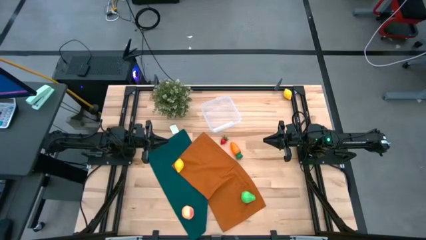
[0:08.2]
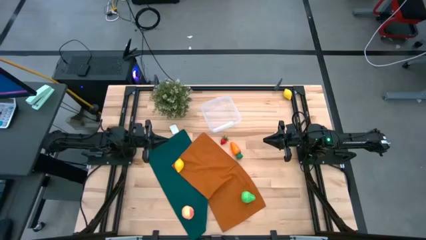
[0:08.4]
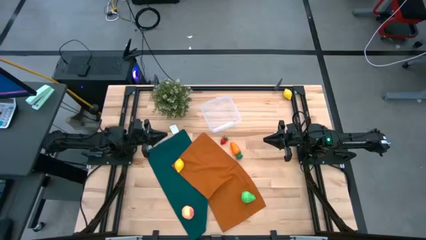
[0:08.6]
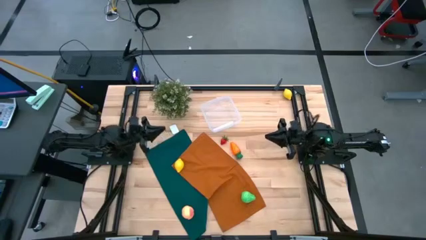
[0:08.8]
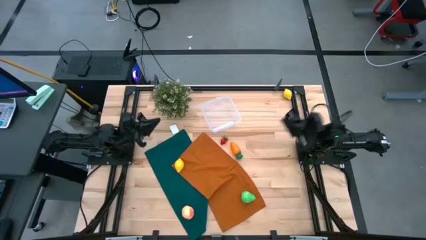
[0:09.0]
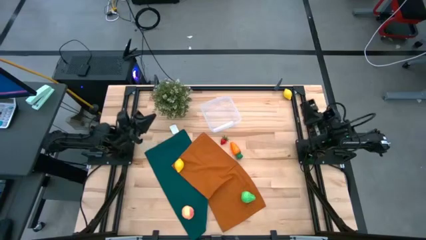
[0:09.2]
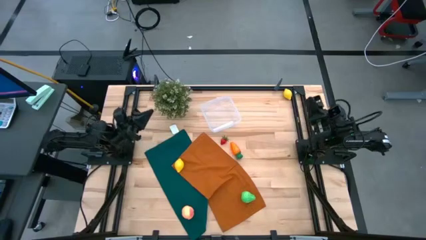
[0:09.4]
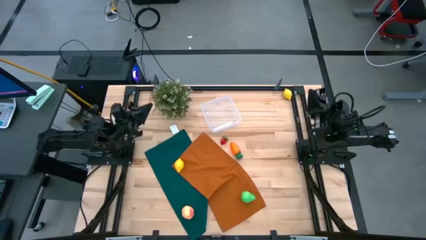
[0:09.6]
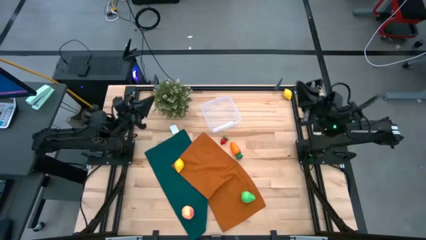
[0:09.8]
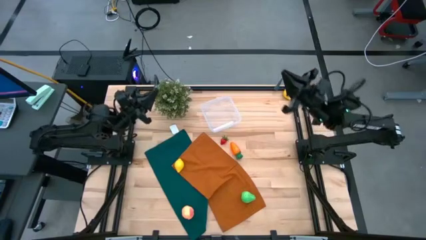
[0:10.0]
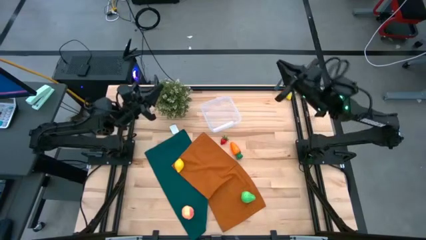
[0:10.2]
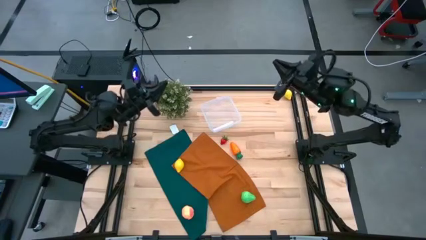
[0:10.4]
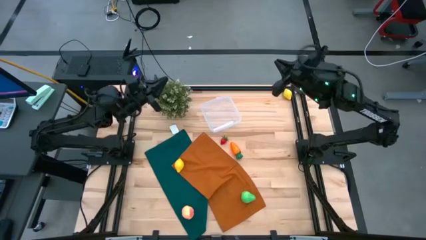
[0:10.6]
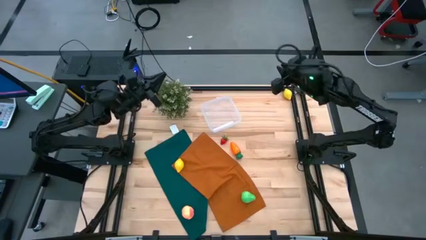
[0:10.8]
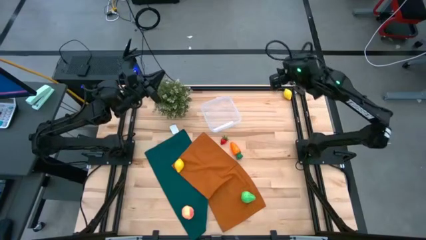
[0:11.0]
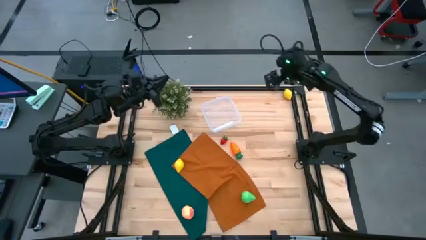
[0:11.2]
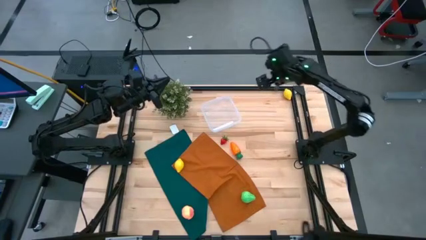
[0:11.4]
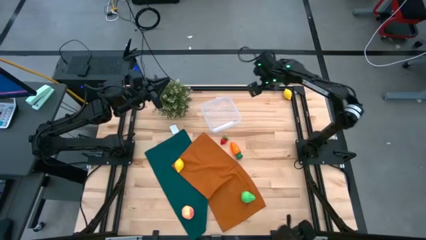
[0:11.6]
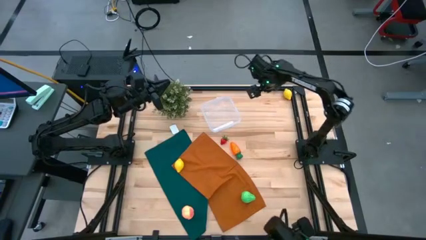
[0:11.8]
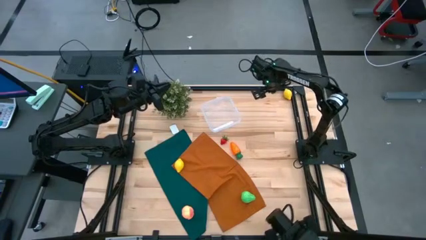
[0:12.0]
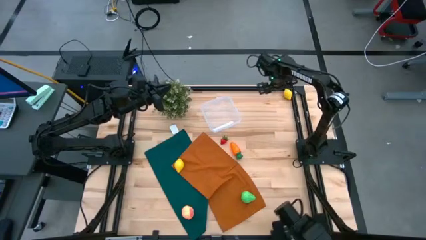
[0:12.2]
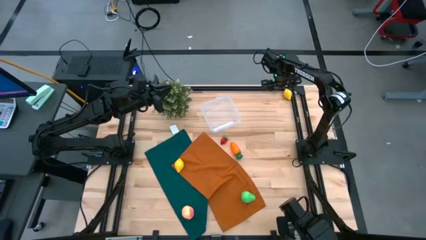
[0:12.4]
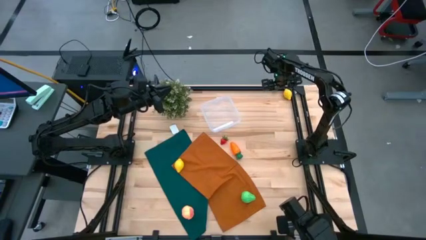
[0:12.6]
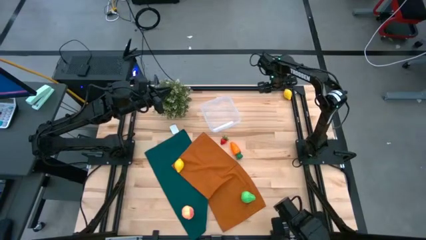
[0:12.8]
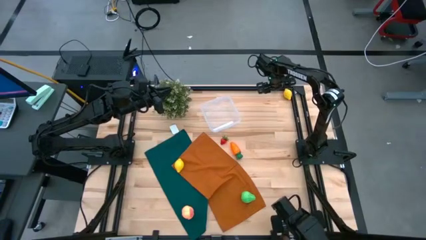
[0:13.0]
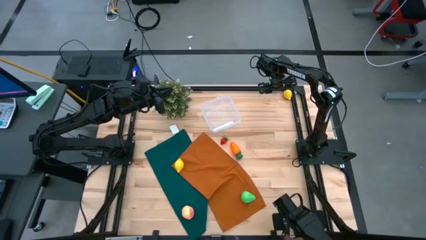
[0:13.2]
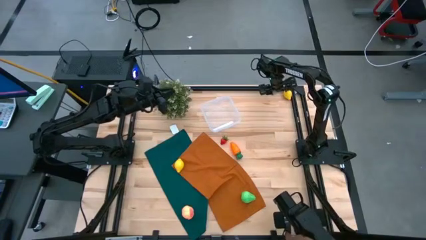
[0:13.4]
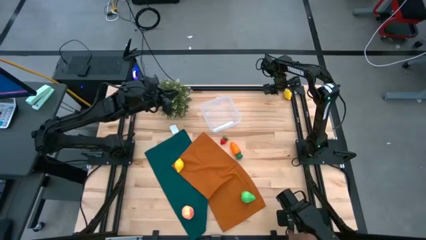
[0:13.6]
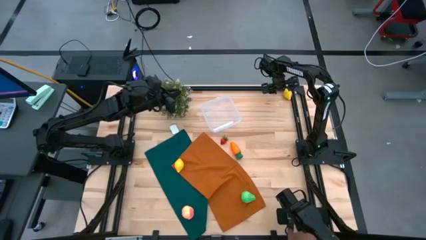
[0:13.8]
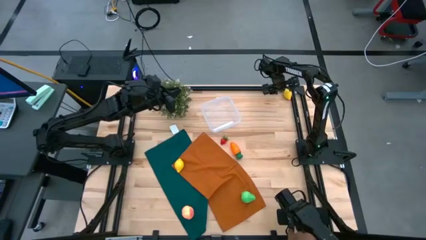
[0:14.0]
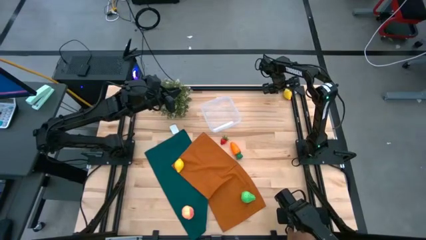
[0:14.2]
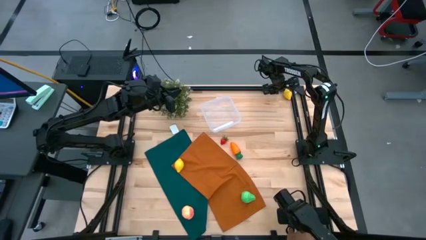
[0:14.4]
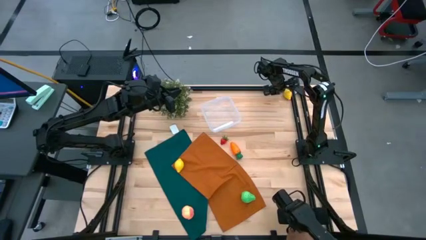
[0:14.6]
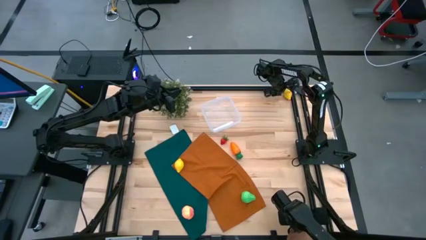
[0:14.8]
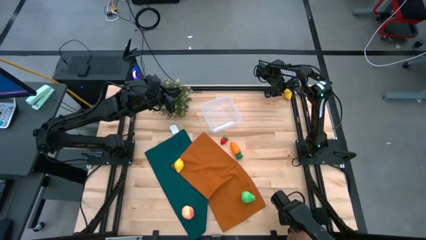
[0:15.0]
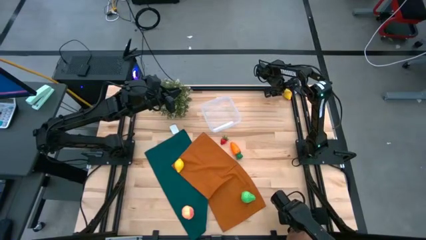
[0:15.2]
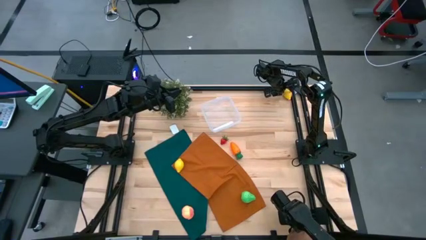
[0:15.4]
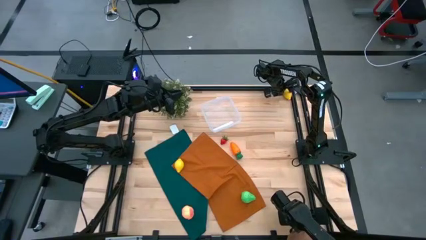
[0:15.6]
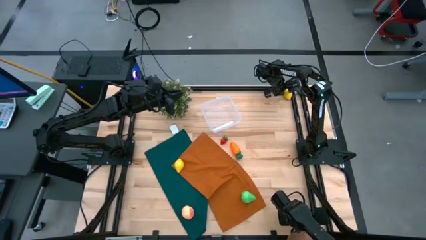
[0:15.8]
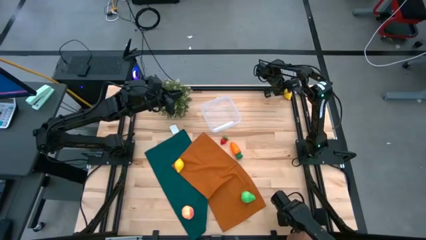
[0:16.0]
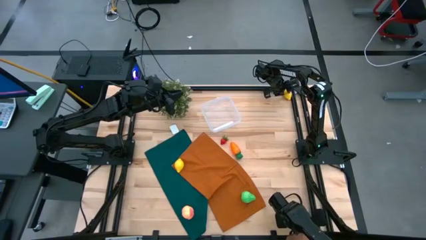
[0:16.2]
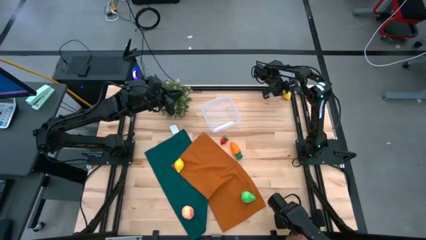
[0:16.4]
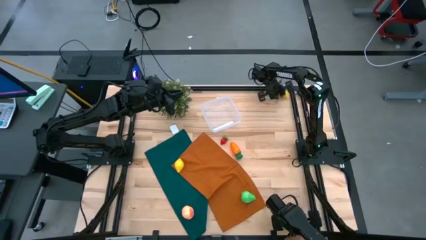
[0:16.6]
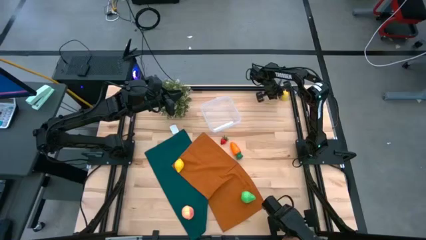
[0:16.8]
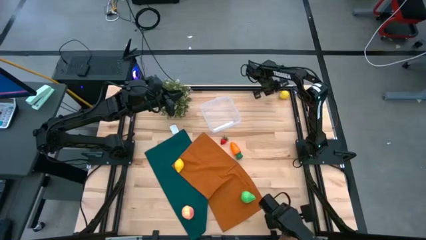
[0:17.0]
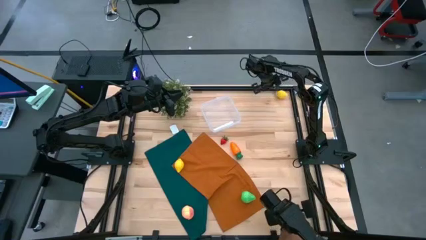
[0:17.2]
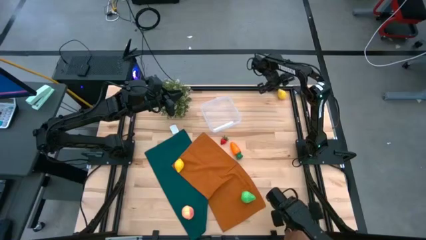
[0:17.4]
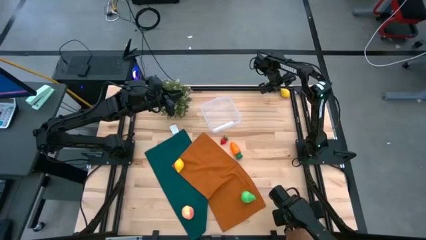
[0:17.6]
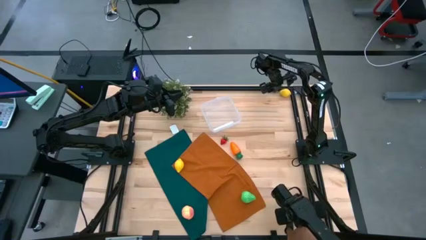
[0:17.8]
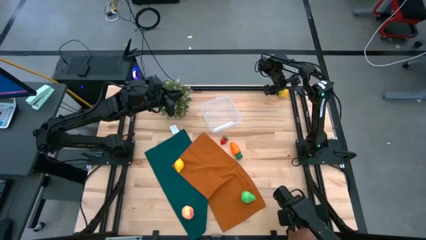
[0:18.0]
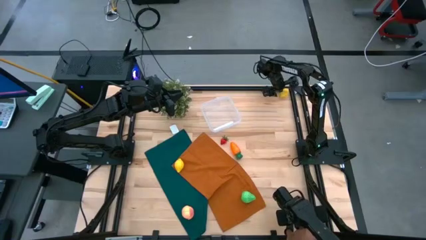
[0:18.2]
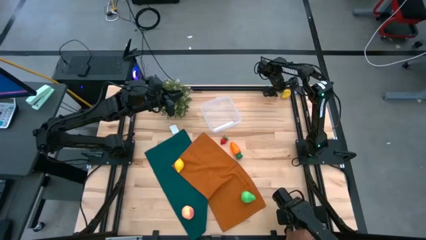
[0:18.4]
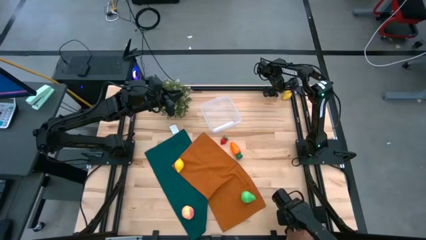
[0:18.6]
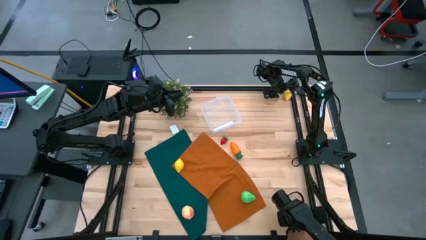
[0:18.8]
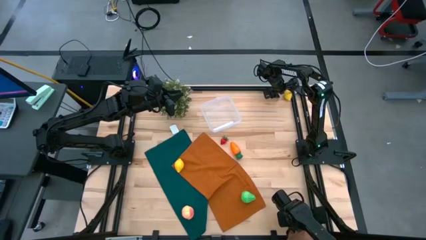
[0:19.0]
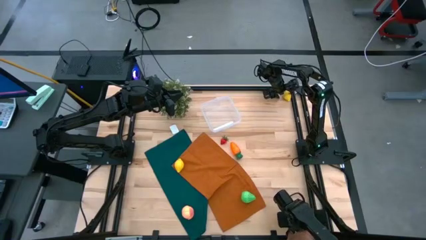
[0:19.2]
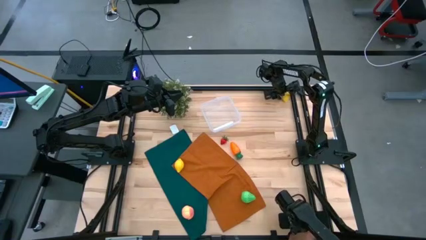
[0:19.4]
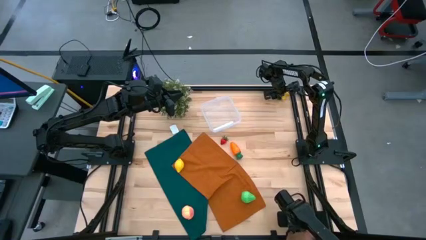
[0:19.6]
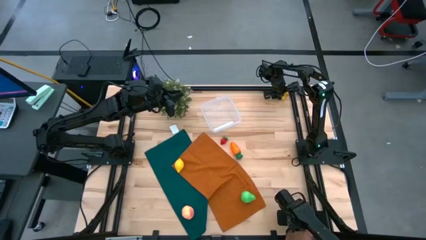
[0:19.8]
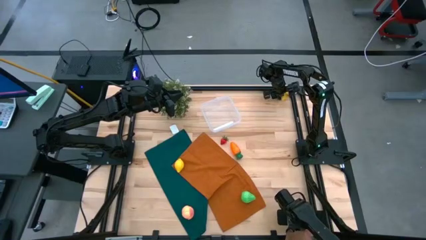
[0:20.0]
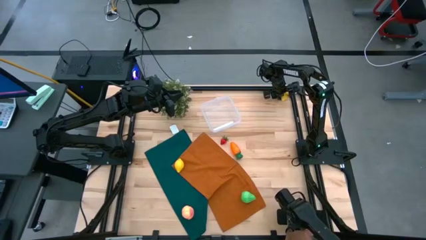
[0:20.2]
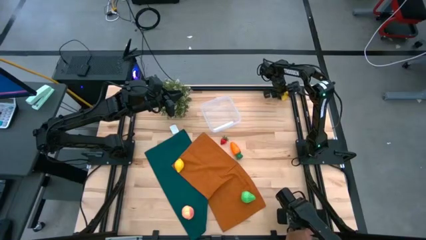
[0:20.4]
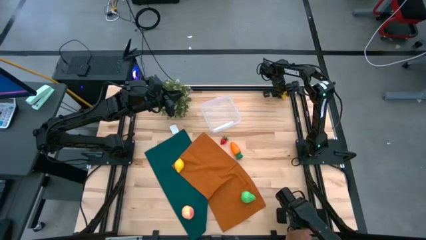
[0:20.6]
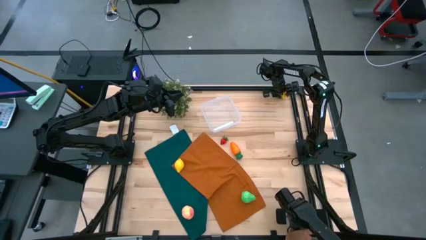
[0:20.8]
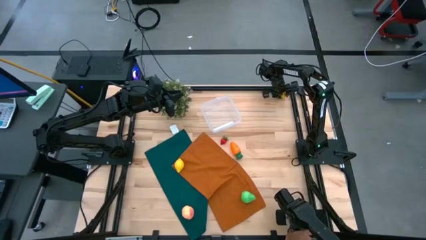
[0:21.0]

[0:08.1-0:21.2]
Task: Pick and placing Produce into tupperware
Put the top yellow lemon into the transparent bin
